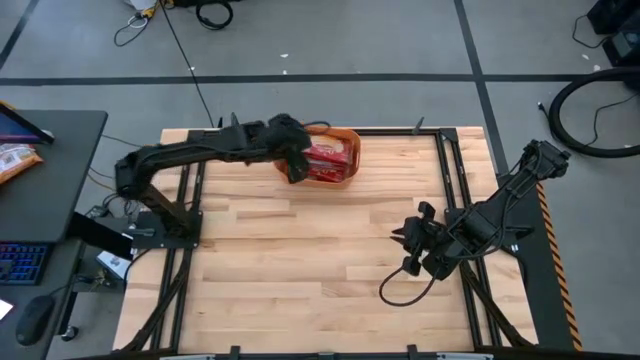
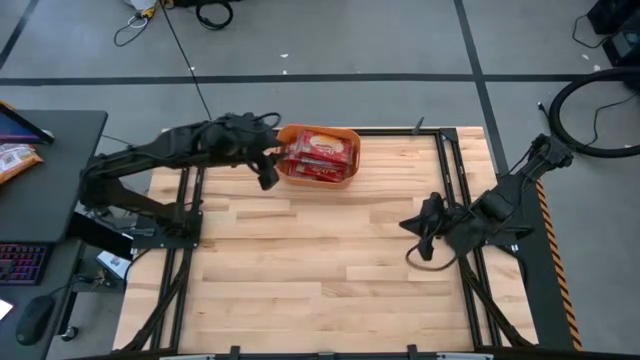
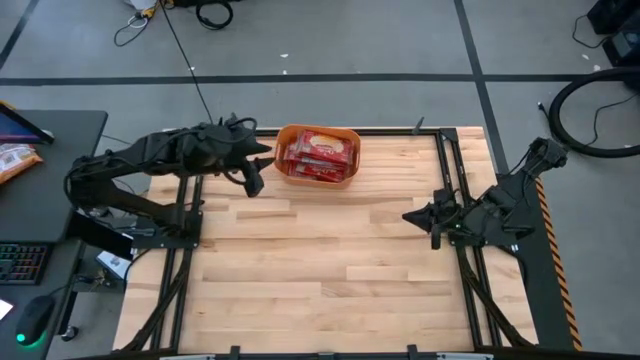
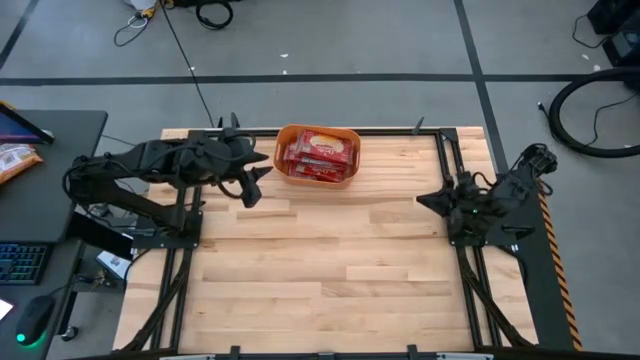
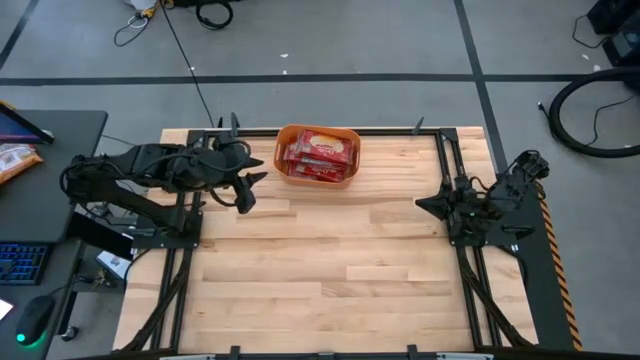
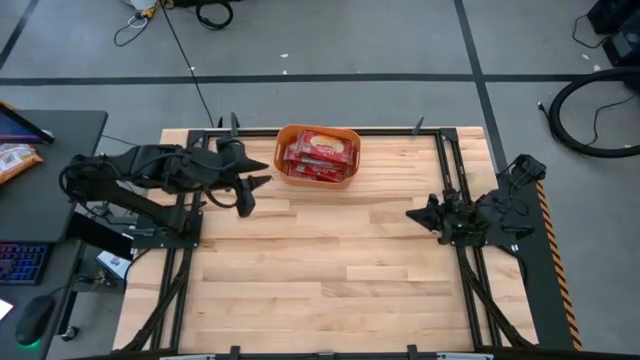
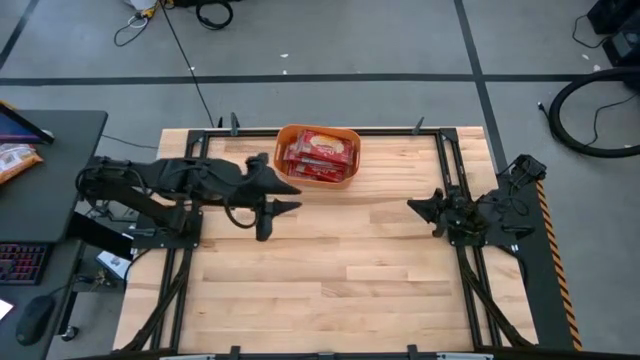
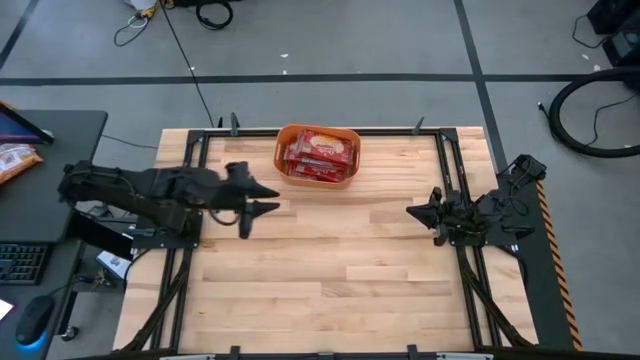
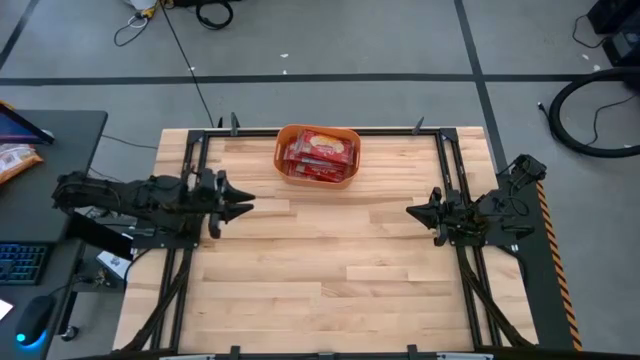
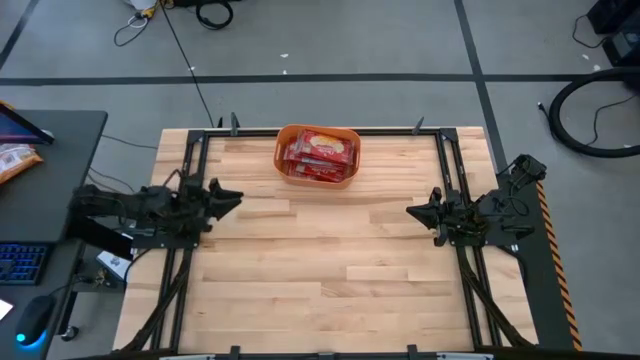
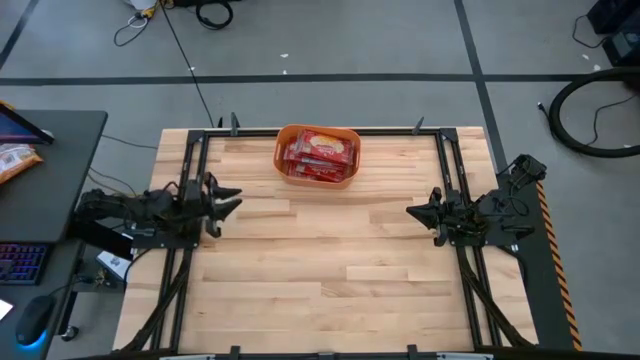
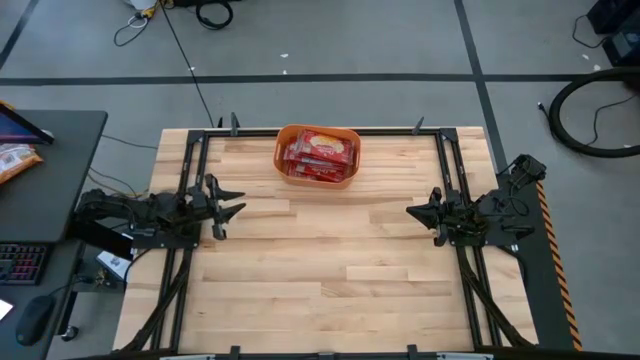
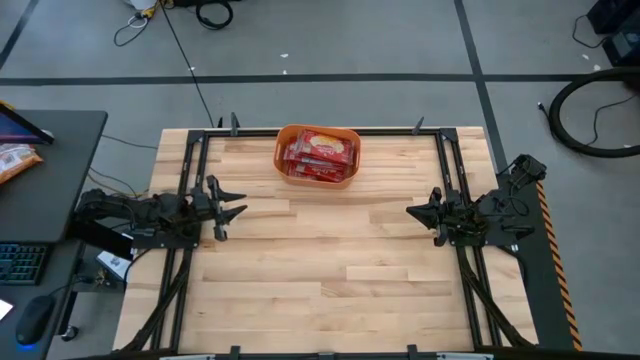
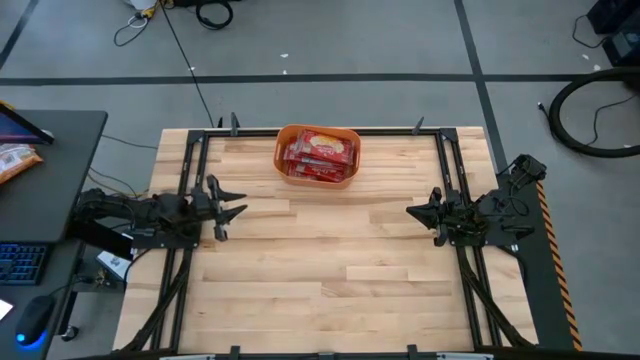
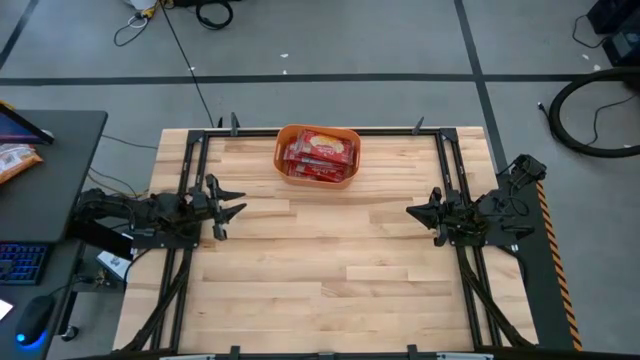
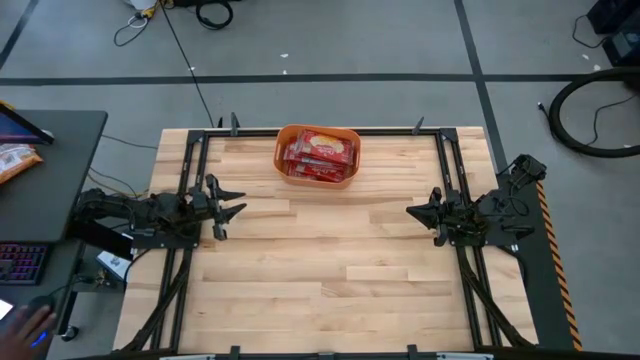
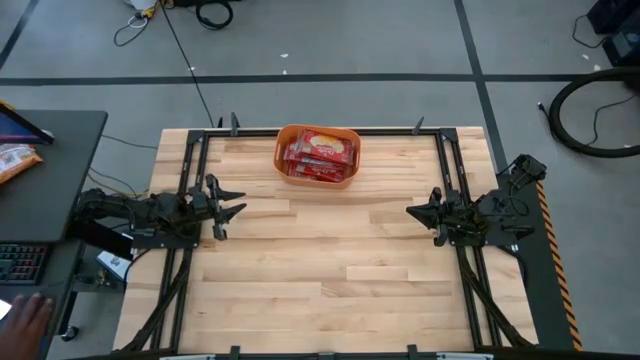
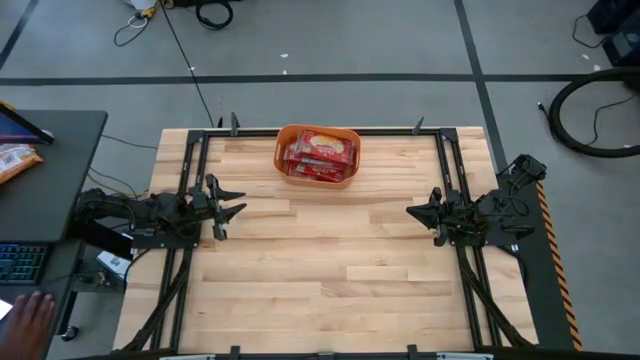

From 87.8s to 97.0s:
Task: Sort popcorn bags into baskets
Return to Home Position

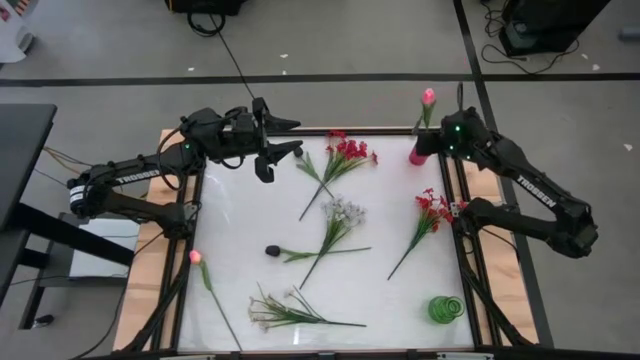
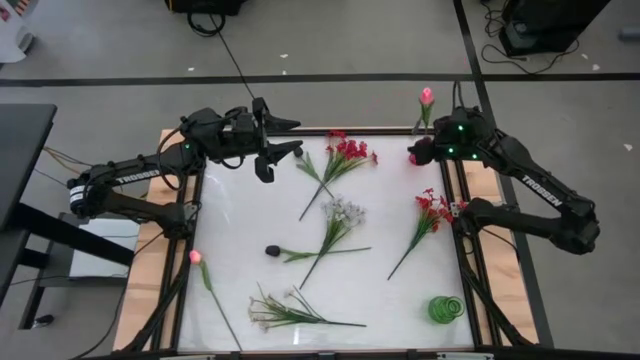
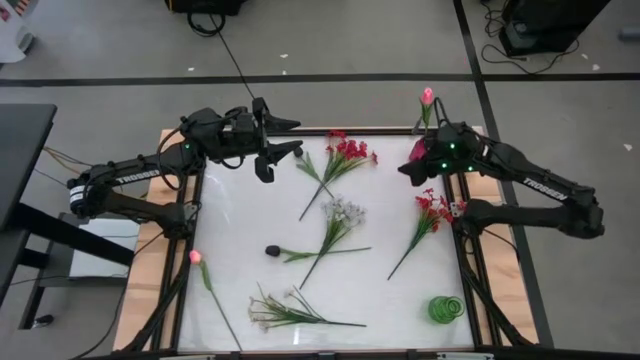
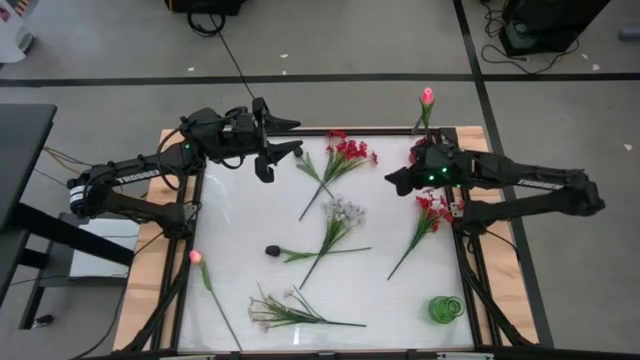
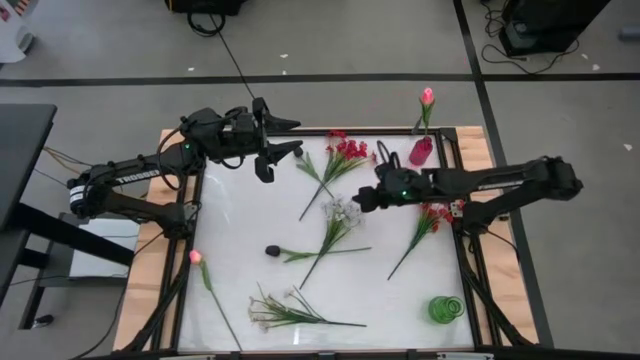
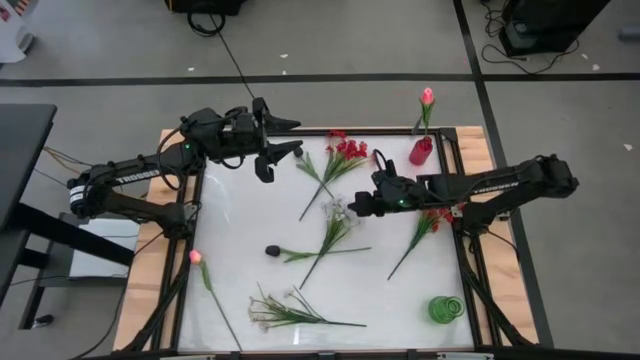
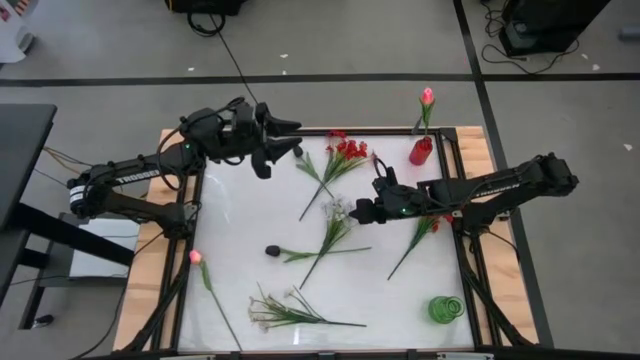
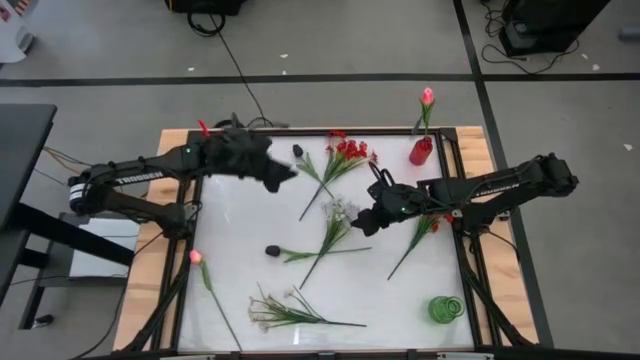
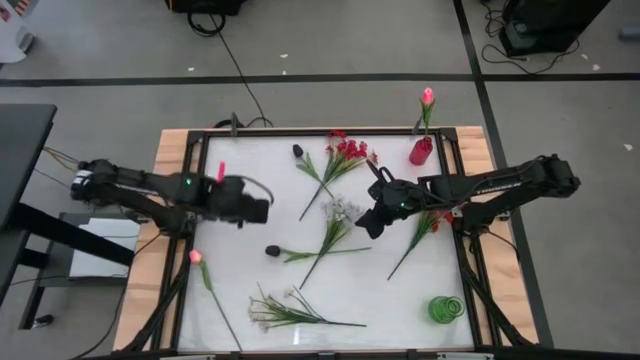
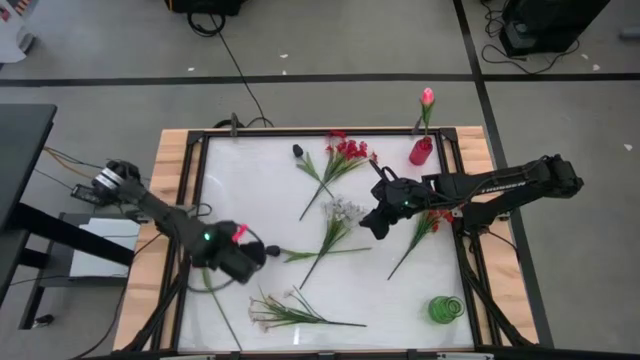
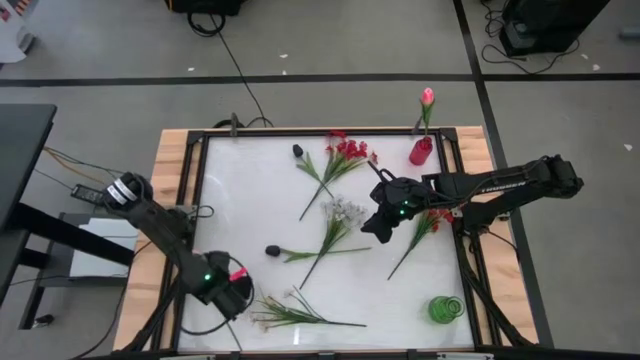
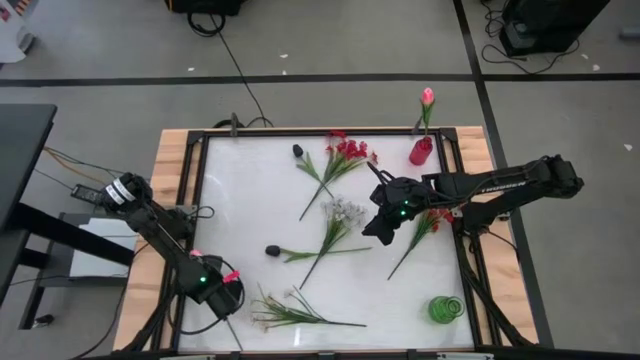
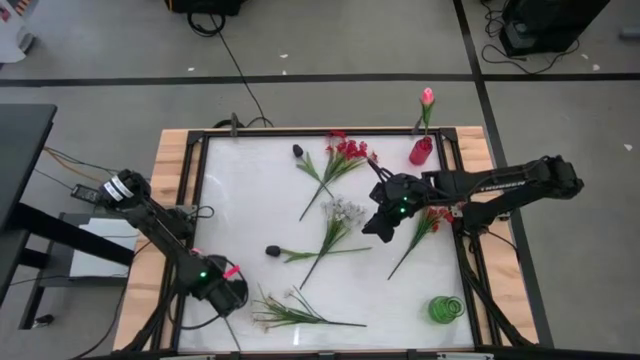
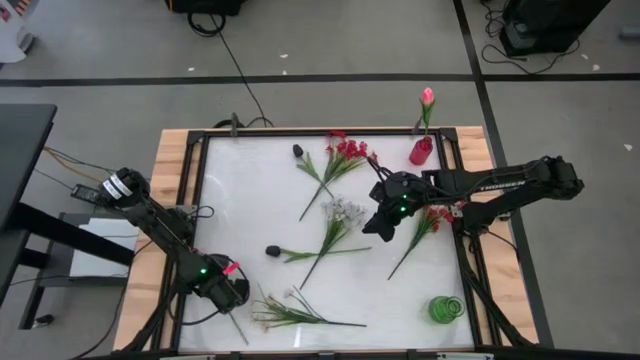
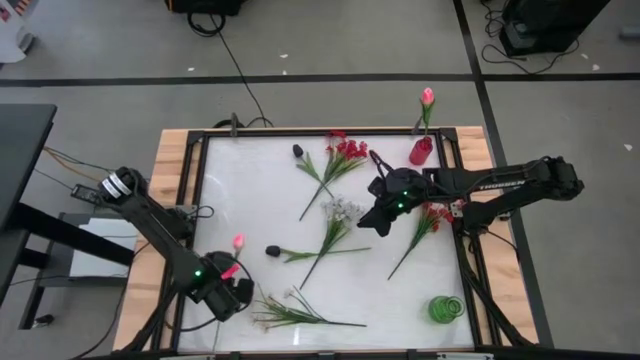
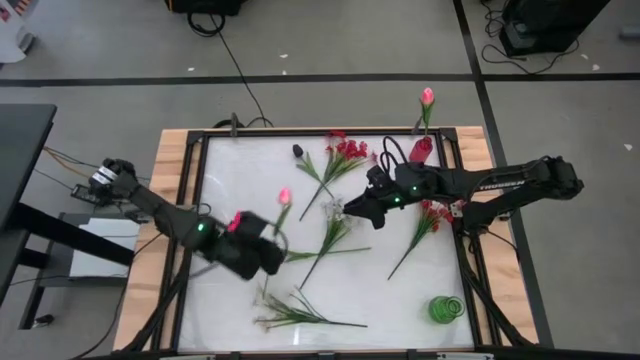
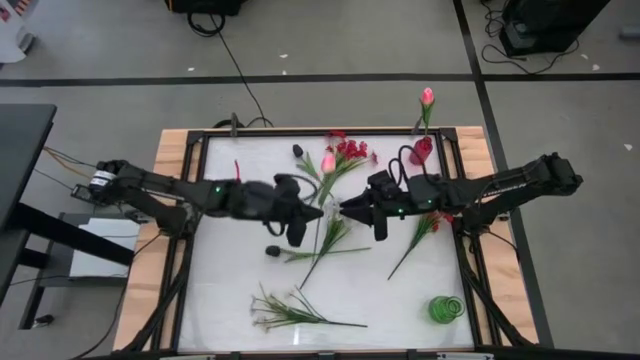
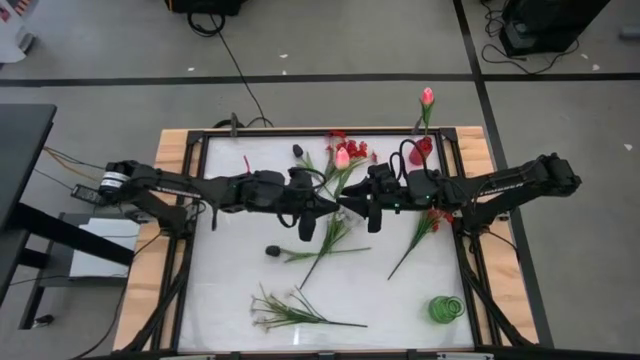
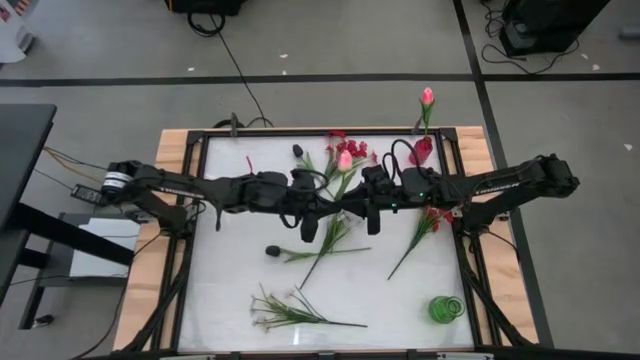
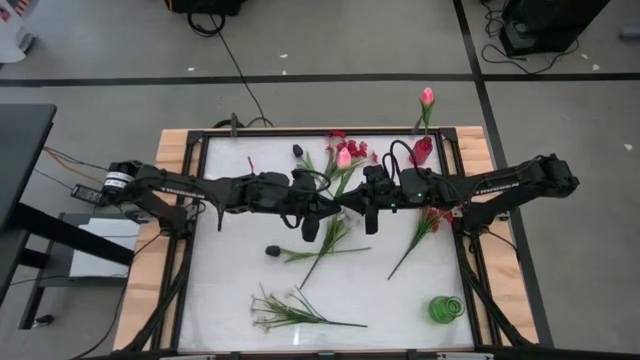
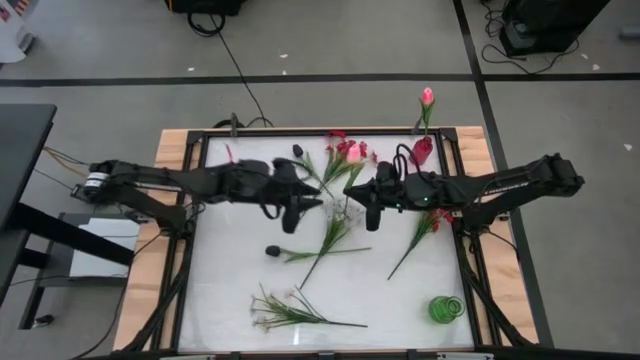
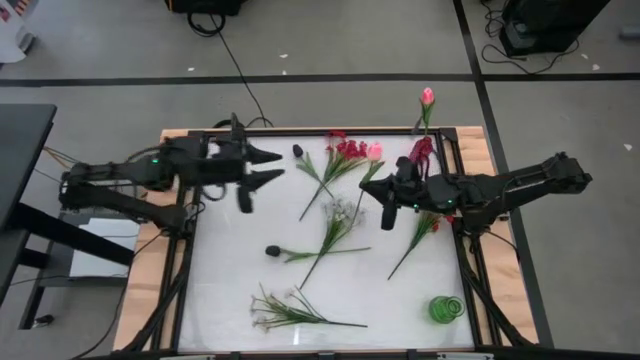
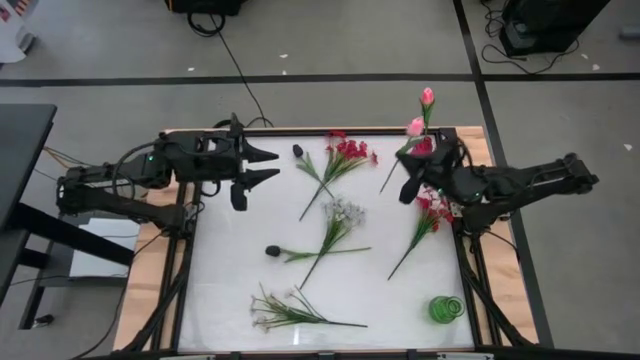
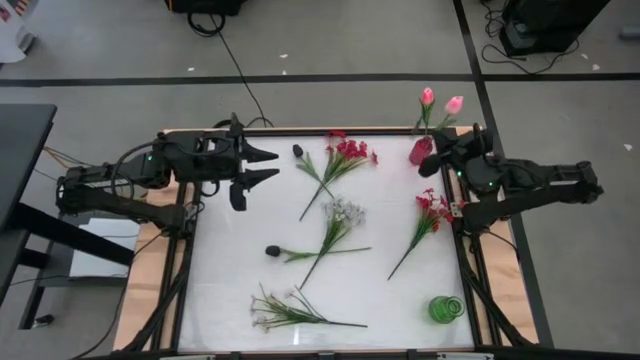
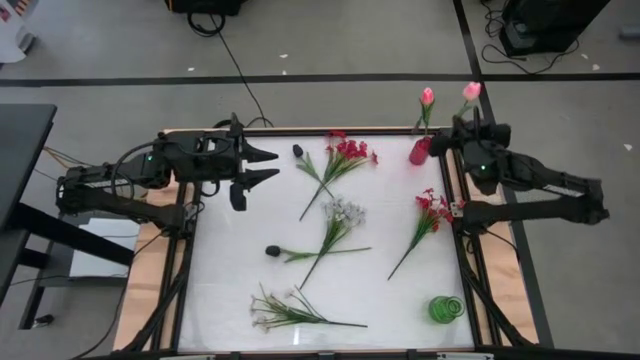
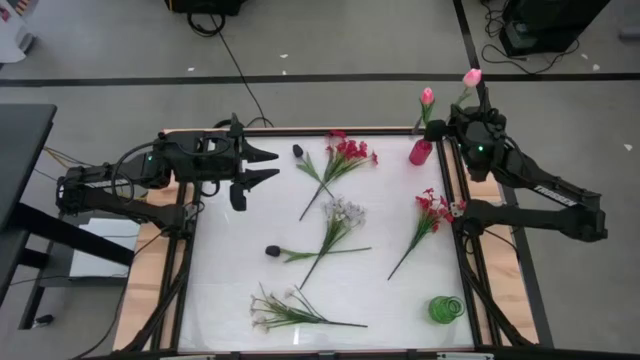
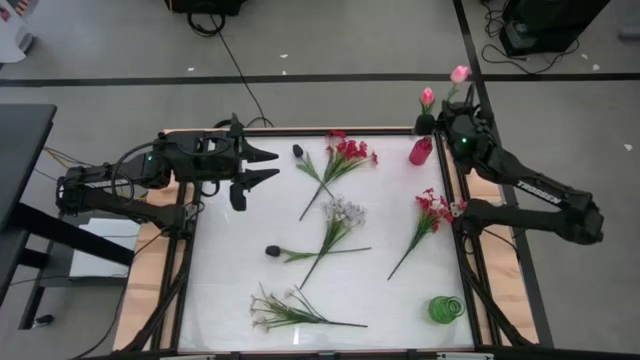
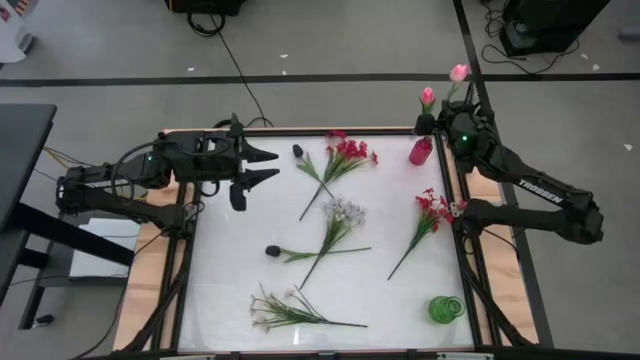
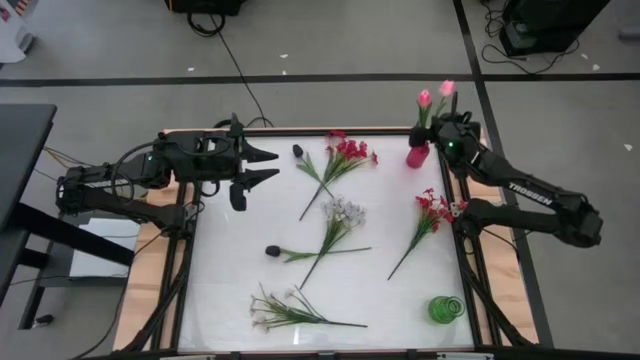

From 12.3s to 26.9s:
Task: Sort flowers into vase by color
Put the pink flower into the red vase
